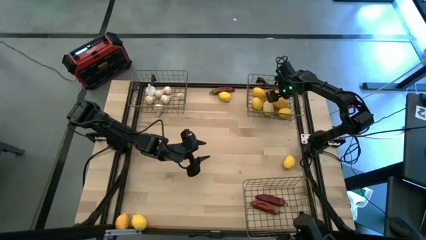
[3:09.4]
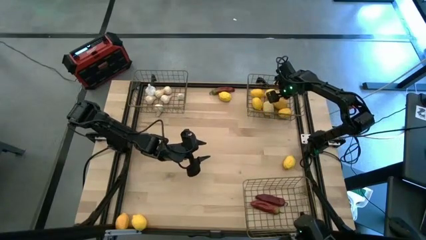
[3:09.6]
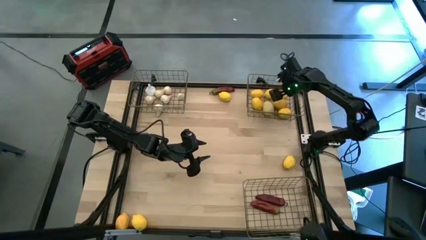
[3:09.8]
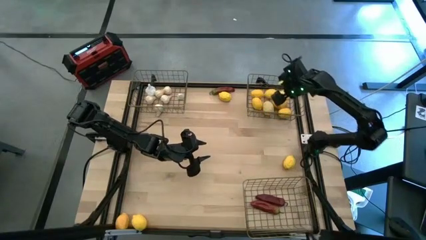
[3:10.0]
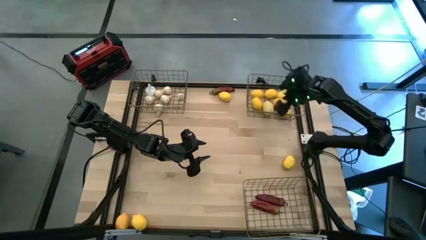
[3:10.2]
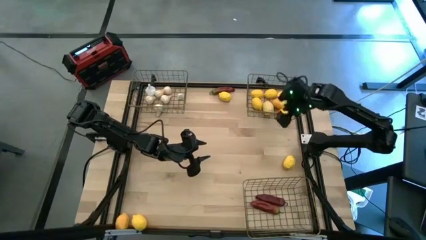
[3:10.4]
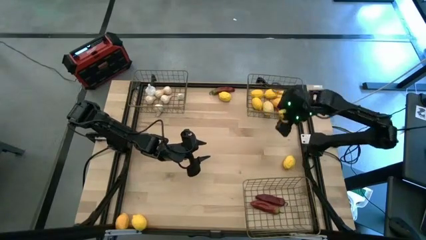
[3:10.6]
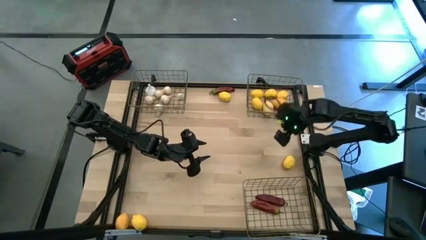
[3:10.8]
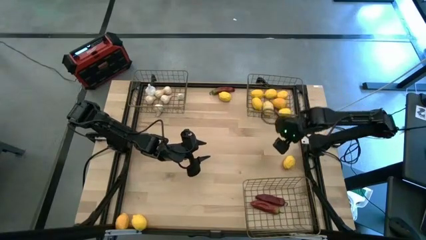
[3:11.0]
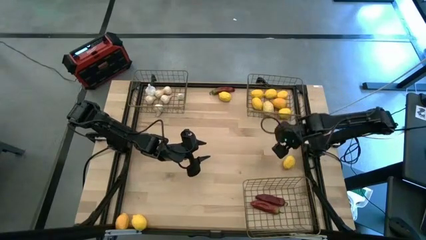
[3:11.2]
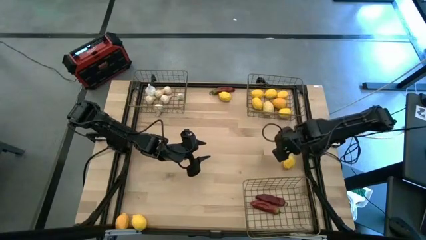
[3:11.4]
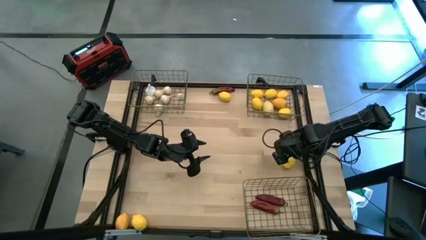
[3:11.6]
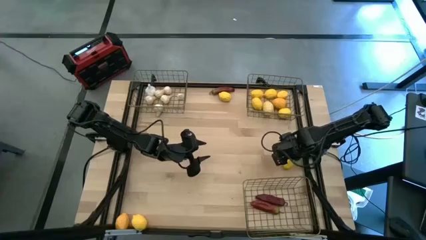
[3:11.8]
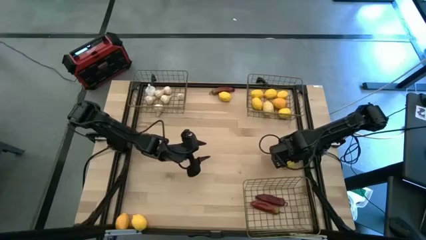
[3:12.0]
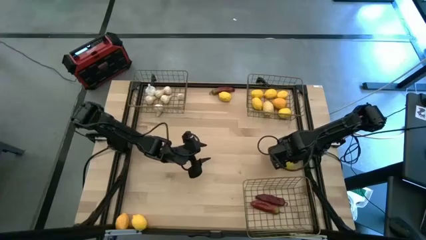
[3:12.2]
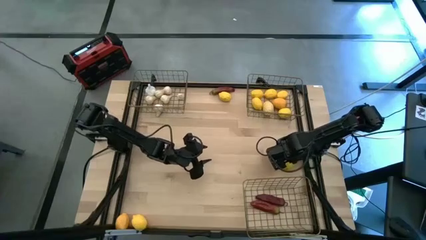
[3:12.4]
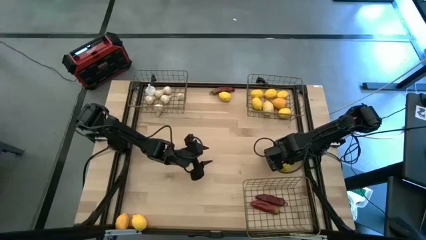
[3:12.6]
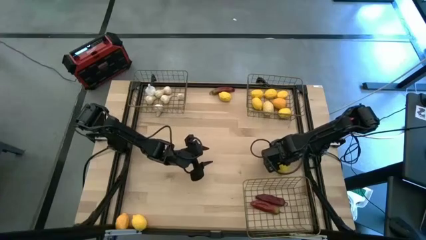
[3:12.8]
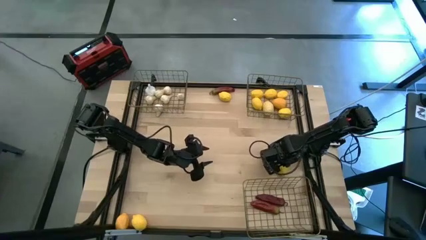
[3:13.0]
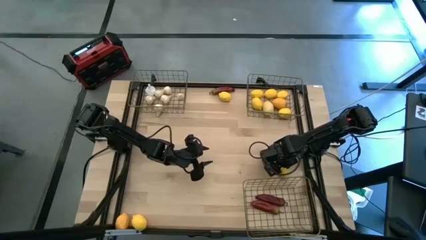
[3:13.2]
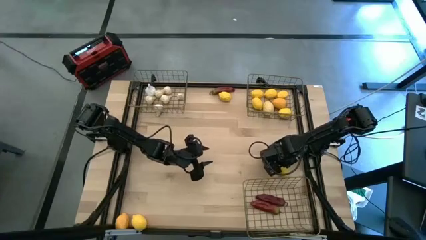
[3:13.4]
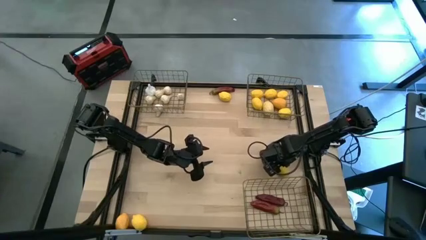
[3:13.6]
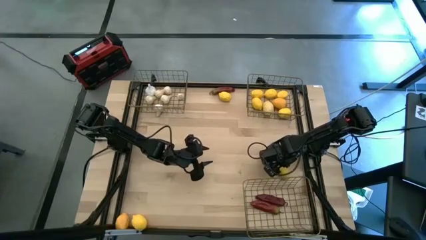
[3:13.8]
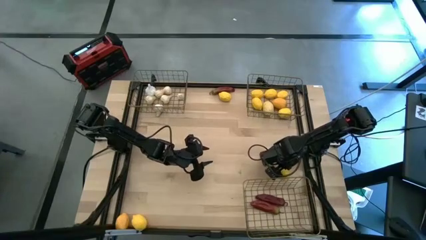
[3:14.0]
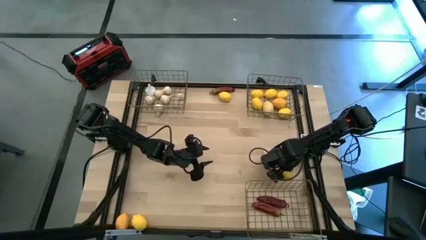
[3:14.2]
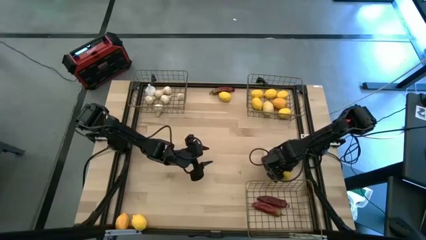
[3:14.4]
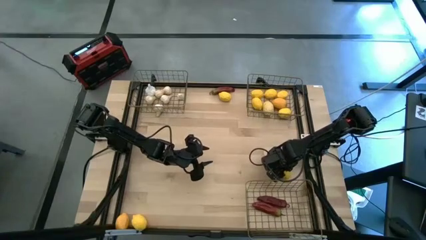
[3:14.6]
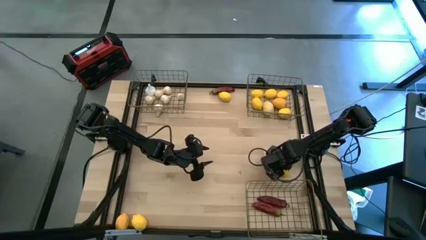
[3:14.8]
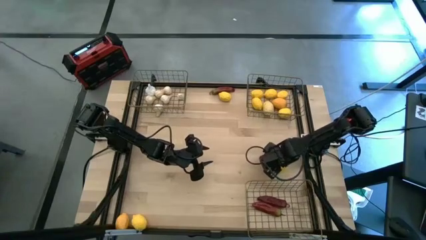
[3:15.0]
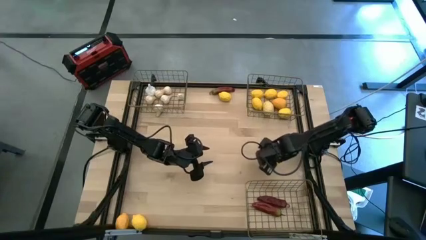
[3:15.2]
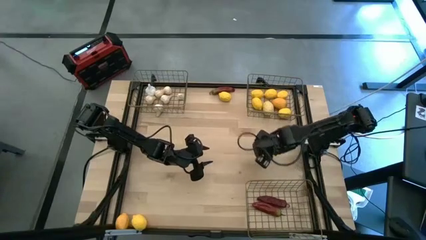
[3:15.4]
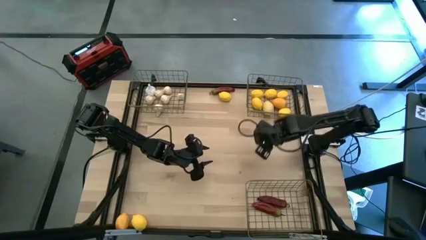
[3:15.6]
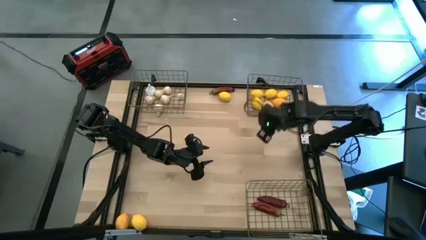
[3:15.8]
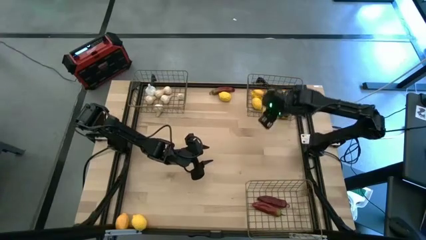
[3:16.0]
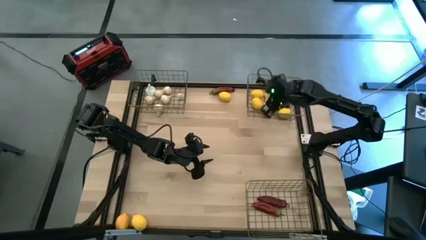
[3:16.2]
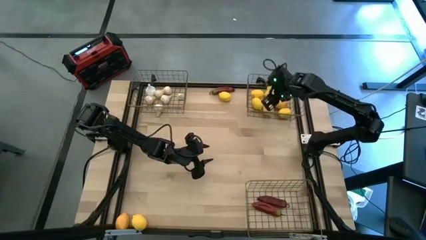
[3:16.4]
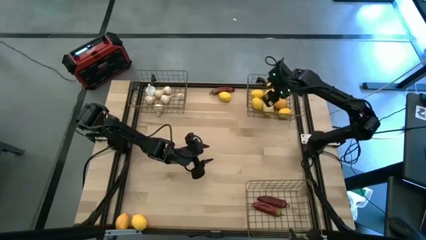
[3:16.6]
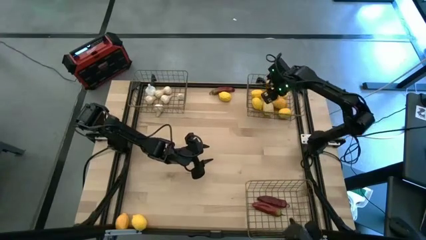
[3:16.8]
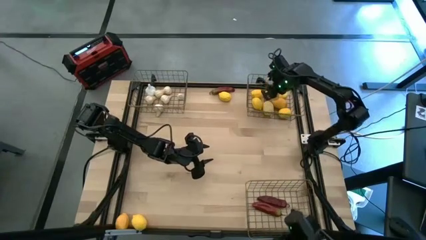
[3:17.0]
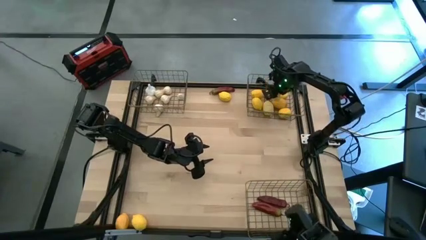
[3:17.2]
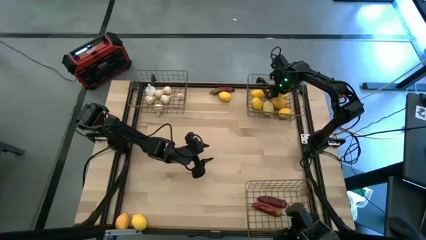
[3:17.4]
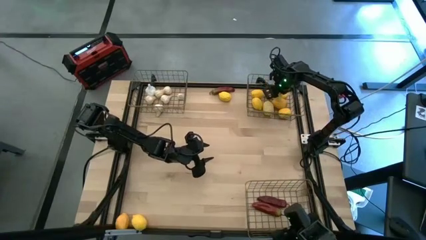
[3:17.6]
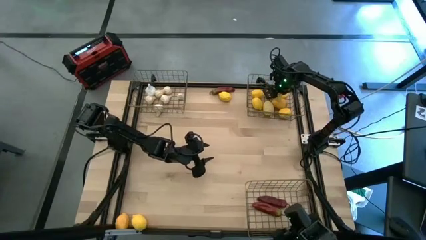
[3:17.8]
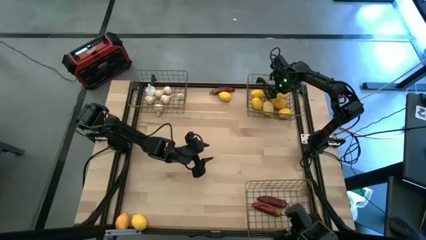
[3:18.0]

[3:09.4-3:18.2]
Task: Sort produce into baskets
Put the yellow lemon into the top right wire basket

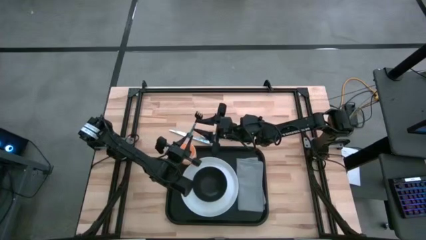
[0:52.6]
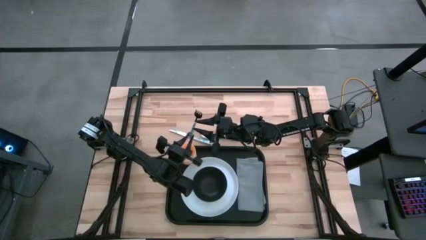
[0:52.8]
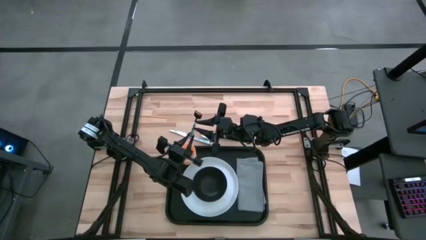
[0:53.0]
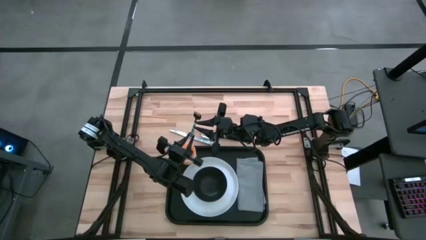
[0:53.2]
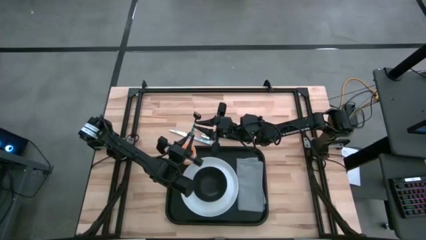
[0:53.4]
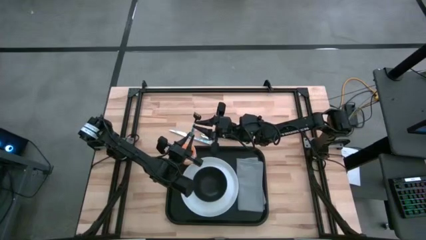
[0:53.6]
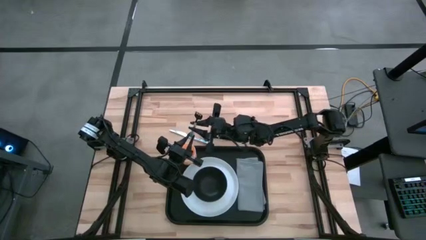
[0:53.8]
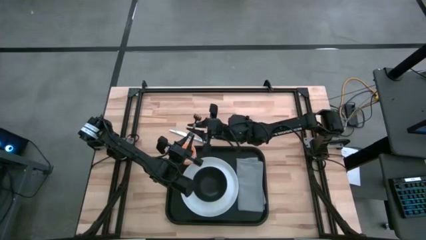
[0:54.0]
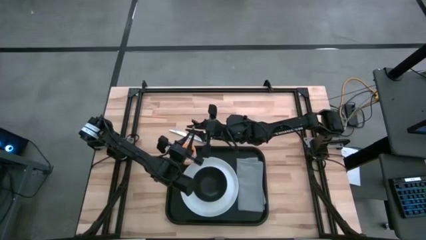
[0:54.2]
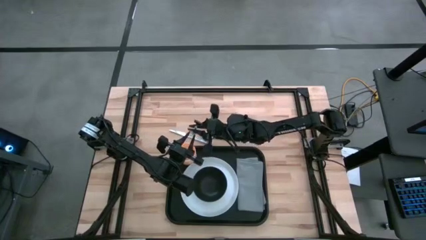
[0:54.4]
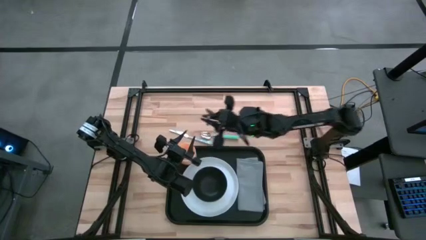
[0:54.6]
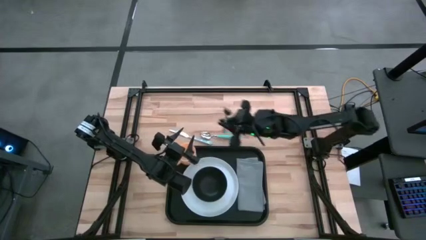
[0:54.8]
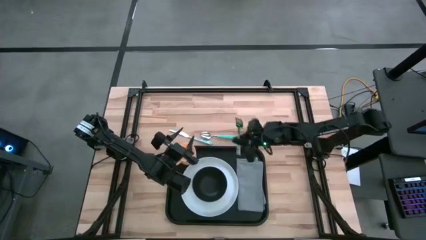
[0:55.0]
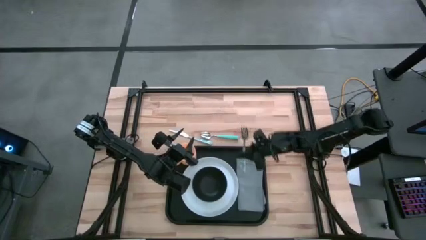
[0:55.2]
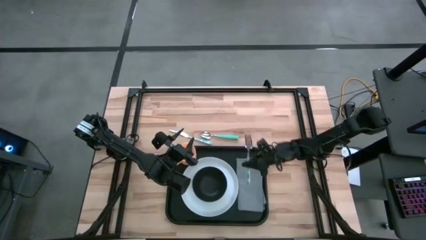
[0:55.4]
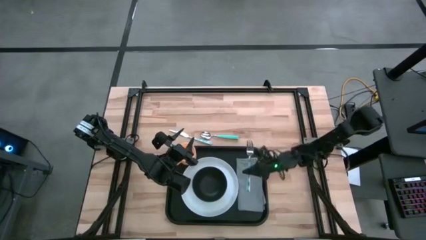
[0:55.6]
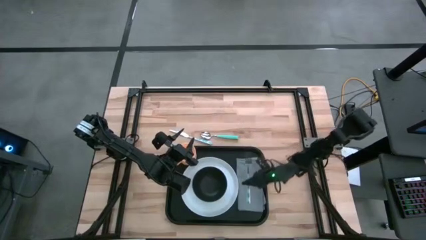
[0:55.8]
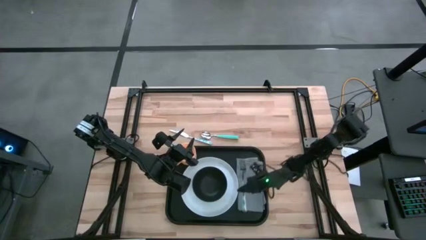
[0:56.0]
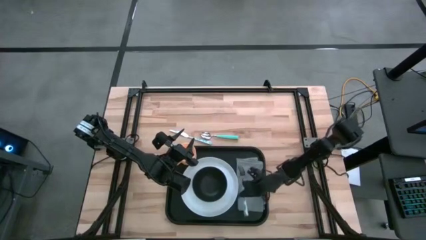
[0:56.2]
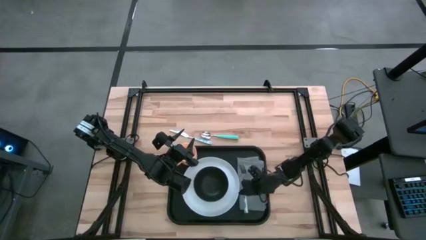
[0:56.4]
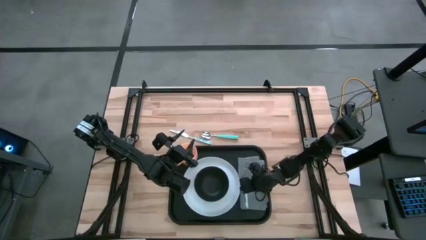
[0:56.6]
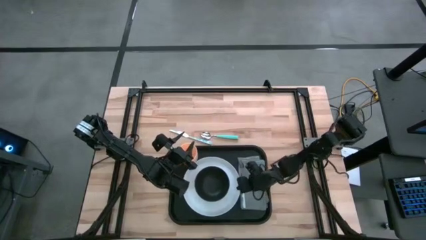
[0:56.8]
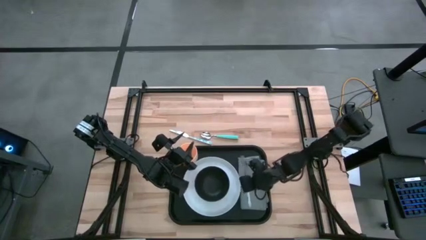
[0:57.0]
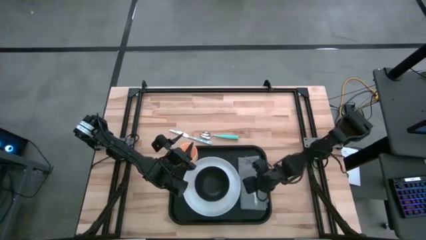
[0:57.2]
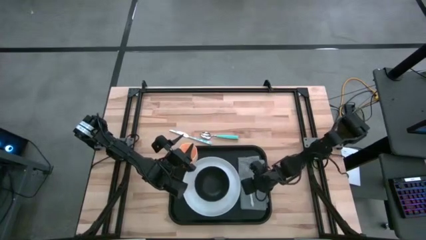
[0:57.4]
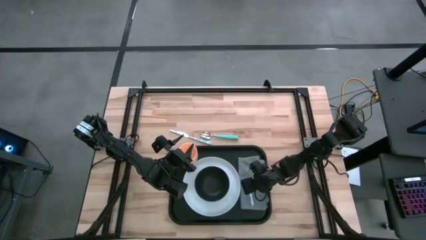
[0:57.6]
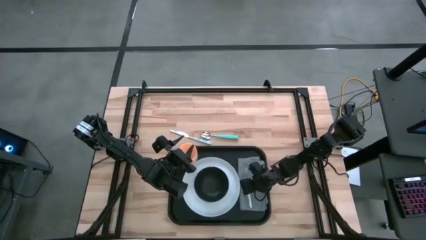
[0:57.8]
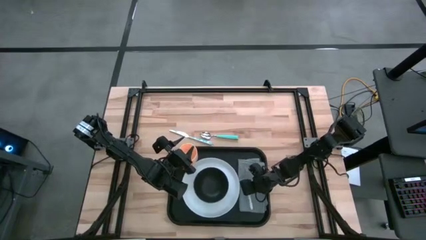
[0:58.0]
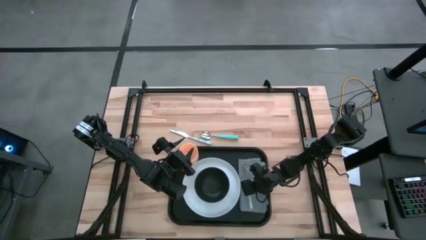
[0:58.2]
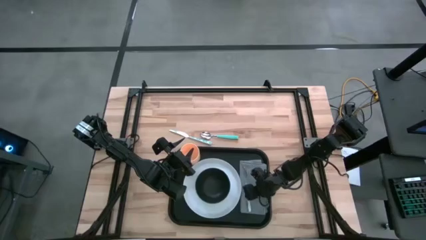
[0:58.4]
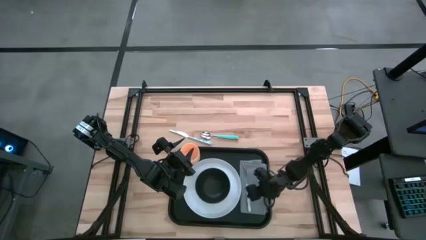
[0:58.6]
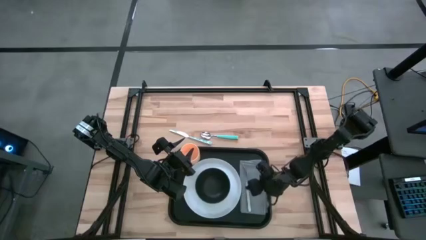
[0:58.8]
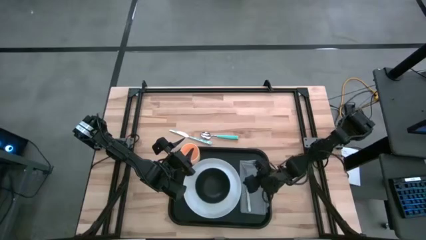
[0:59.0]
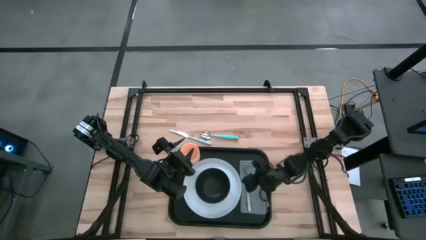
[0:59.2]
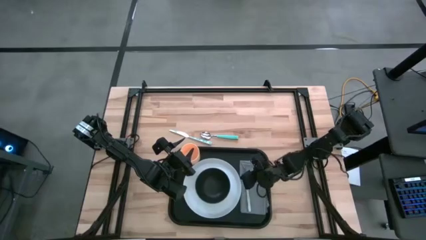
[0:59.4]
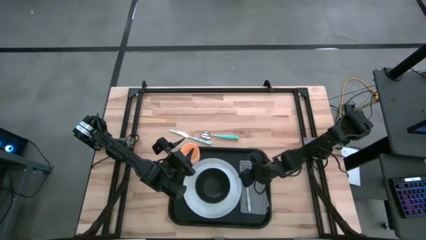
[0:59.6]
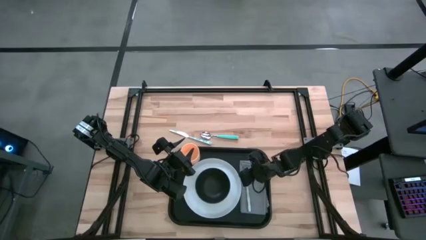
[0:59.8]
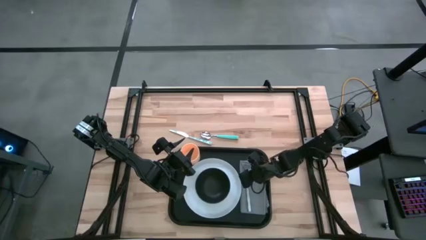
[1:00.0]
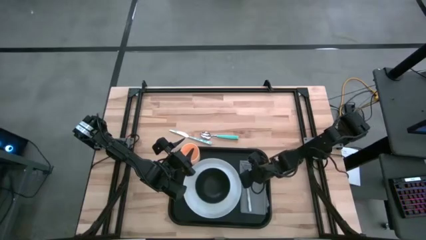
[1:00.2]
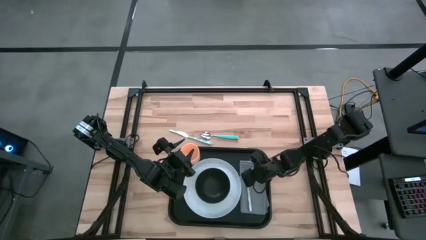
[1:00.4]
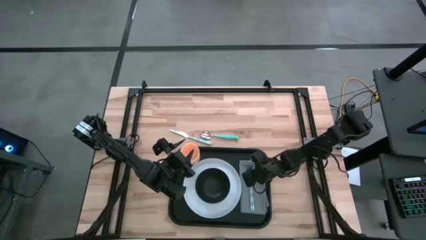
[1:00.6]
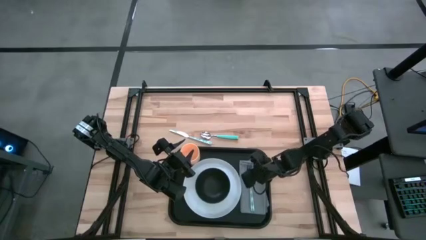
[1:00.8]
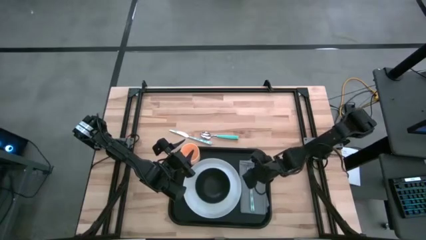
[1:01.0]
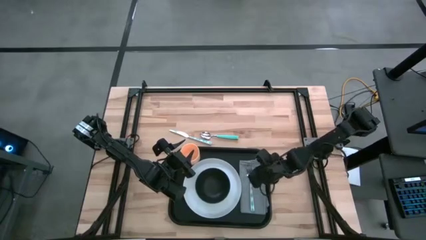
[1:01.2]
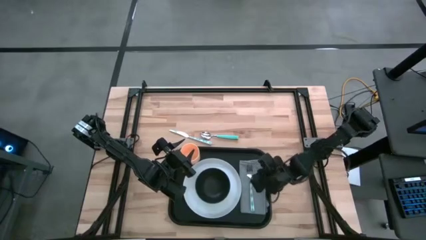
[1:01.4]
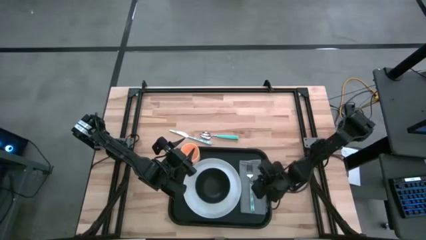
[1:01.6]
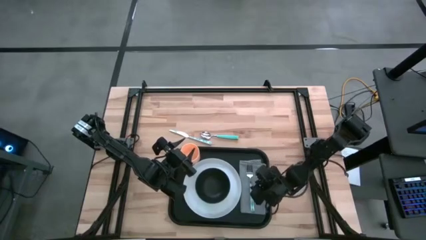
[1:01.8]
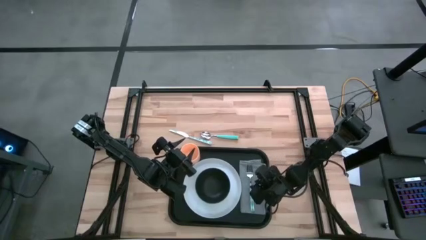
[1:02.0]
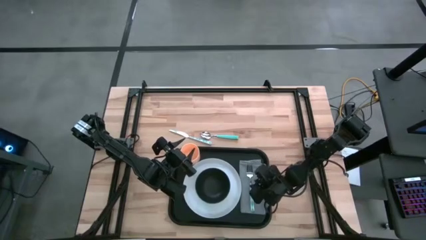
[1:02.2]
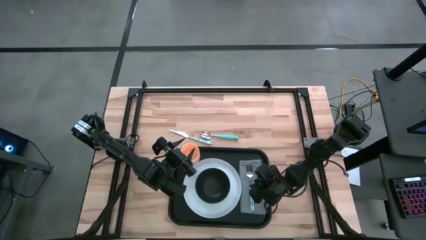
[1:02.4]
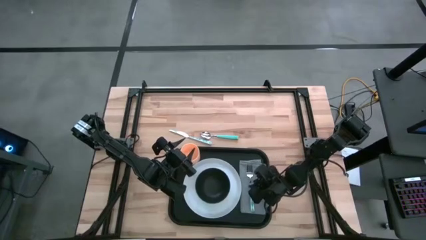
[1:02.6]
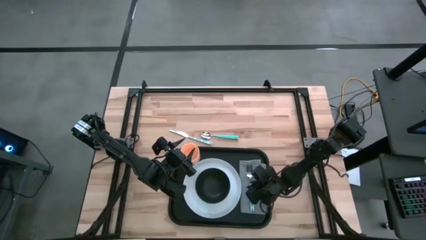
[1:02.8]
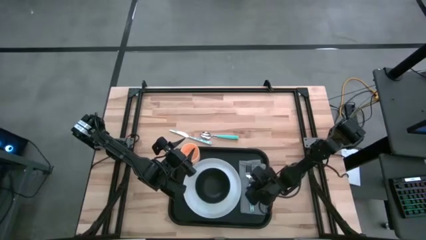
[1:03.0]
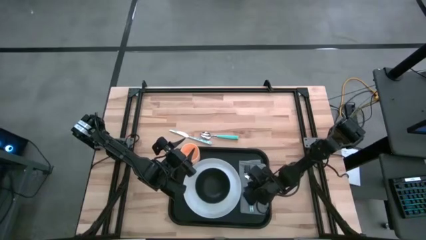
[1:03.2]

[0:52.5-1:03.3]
Task: Set up tray
Put the blue fork on the gray napkin on the black tray
